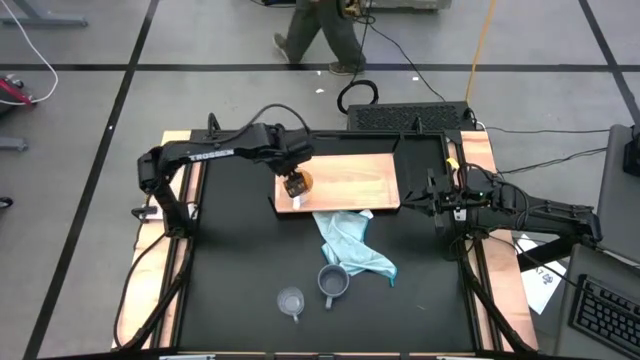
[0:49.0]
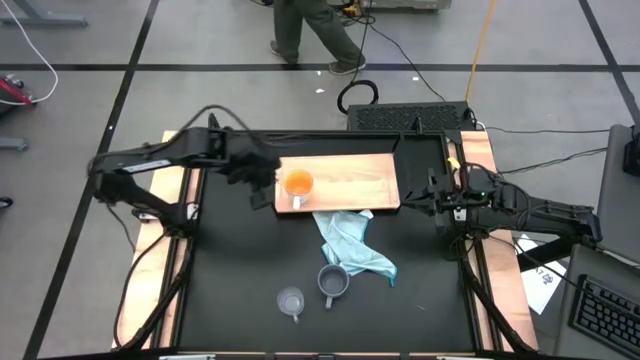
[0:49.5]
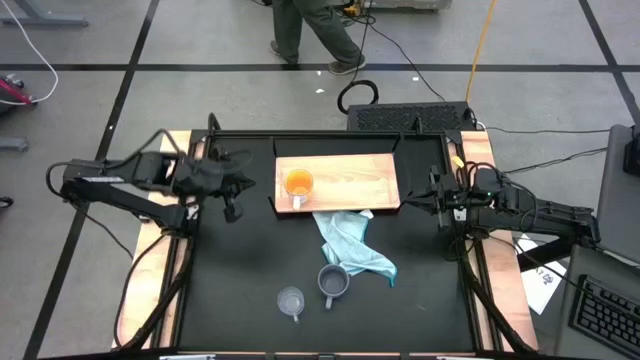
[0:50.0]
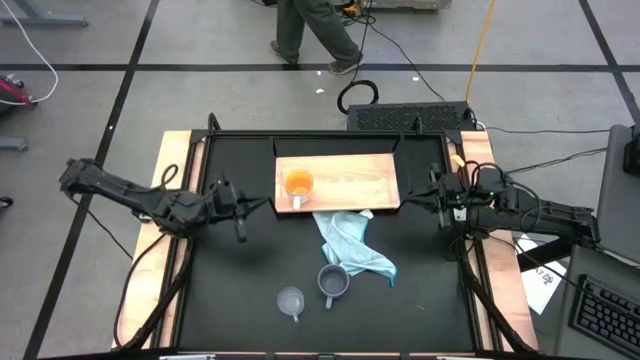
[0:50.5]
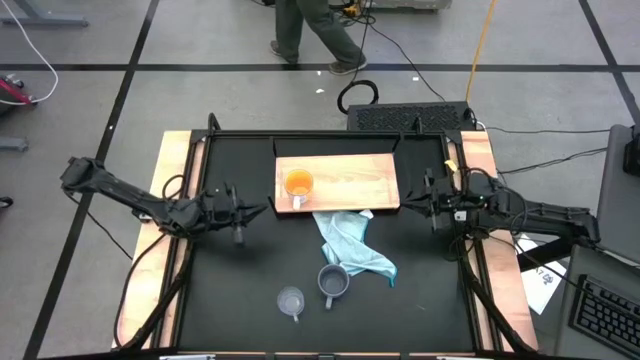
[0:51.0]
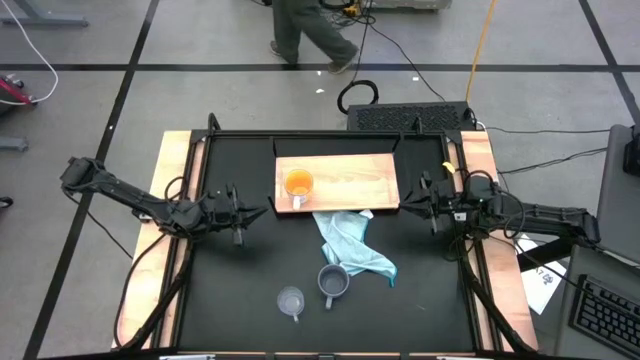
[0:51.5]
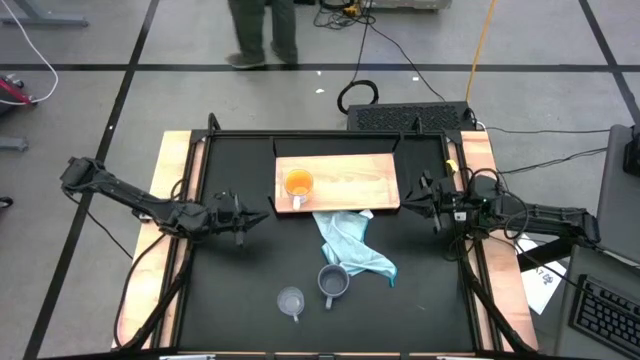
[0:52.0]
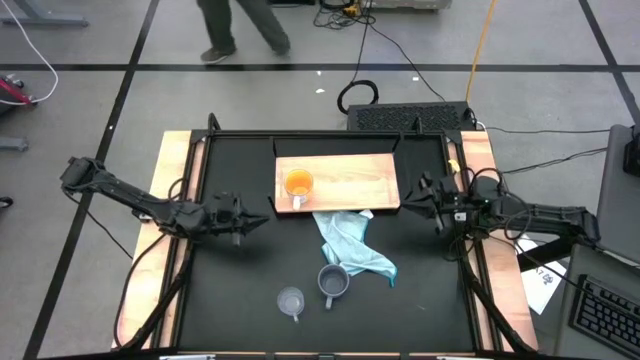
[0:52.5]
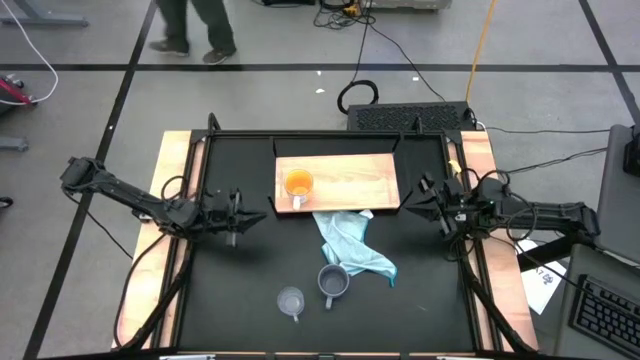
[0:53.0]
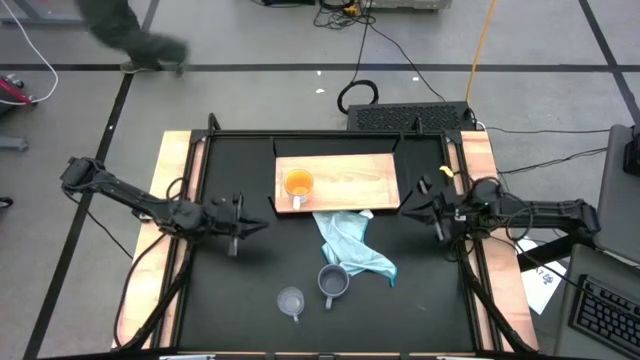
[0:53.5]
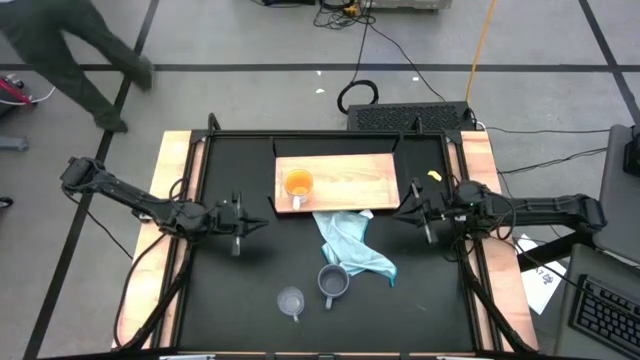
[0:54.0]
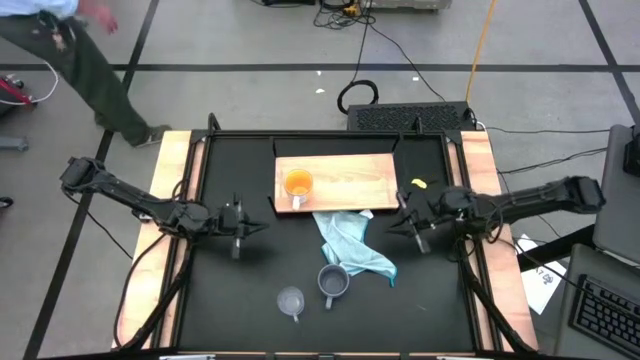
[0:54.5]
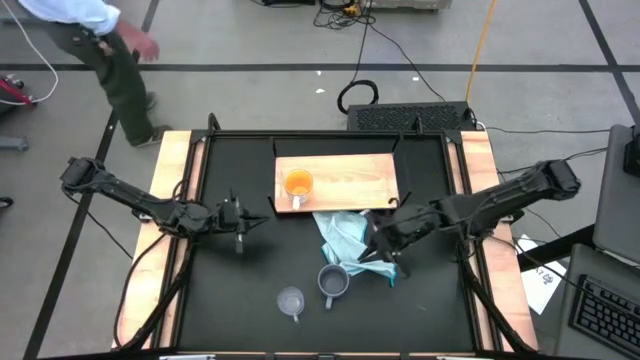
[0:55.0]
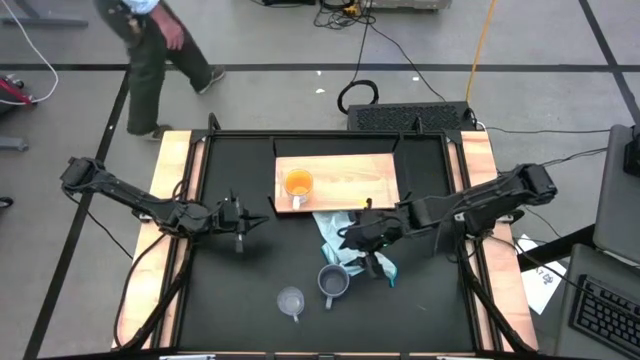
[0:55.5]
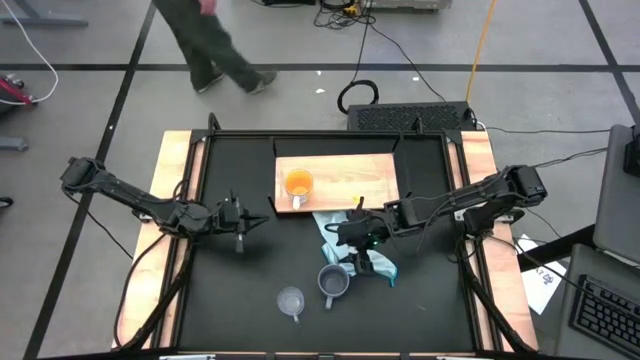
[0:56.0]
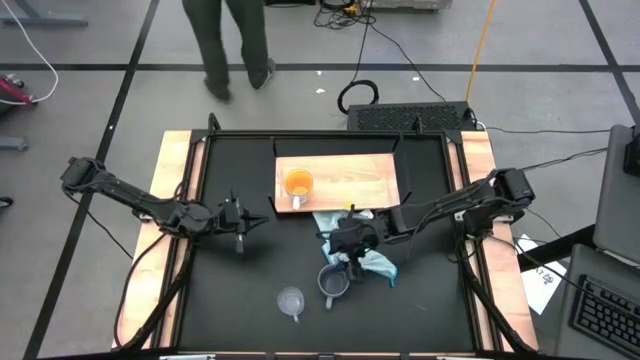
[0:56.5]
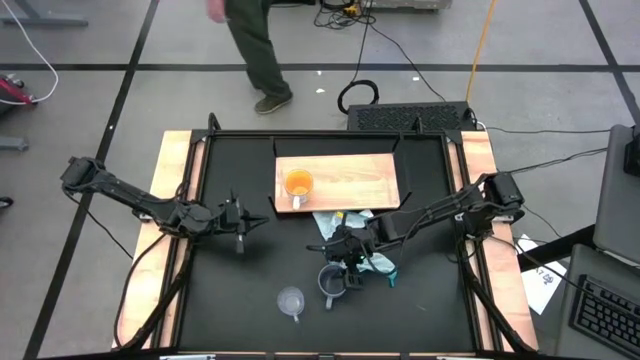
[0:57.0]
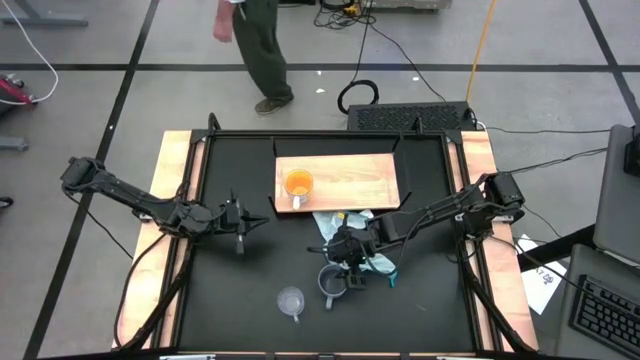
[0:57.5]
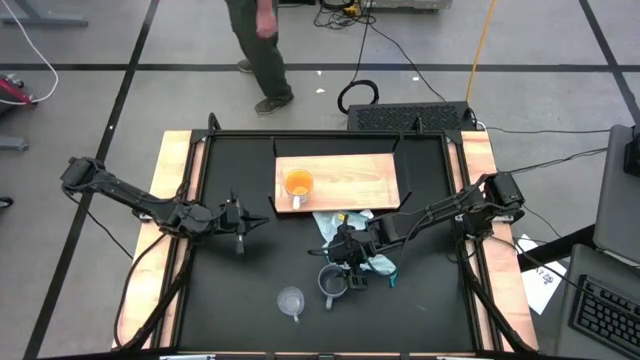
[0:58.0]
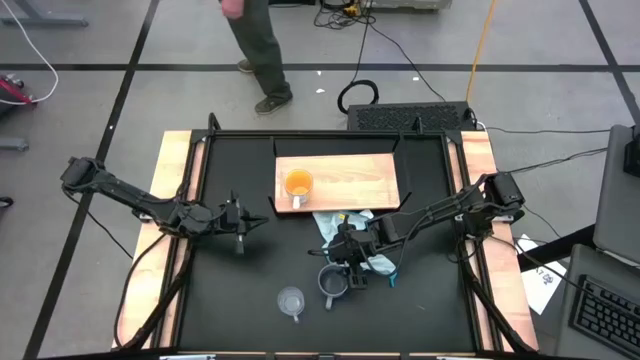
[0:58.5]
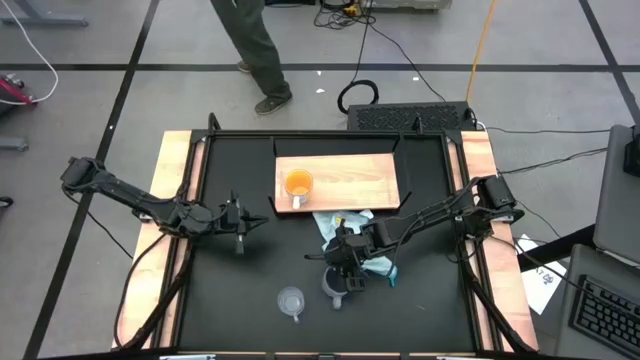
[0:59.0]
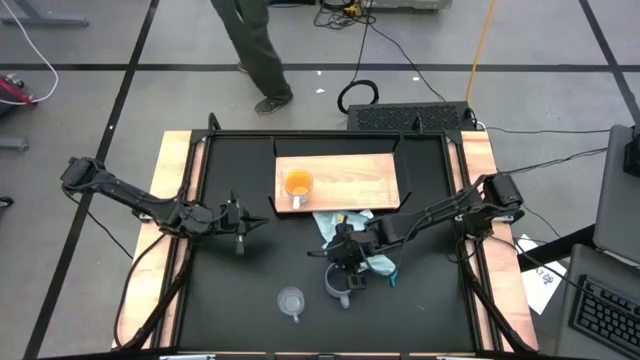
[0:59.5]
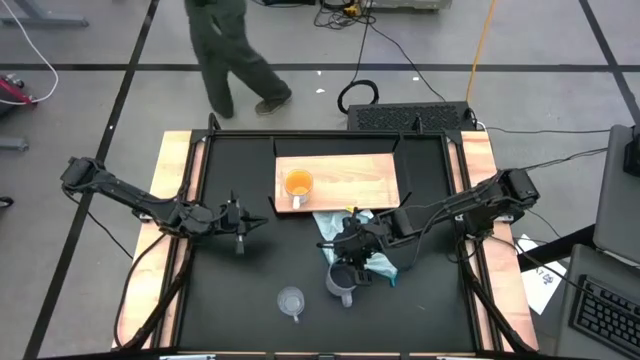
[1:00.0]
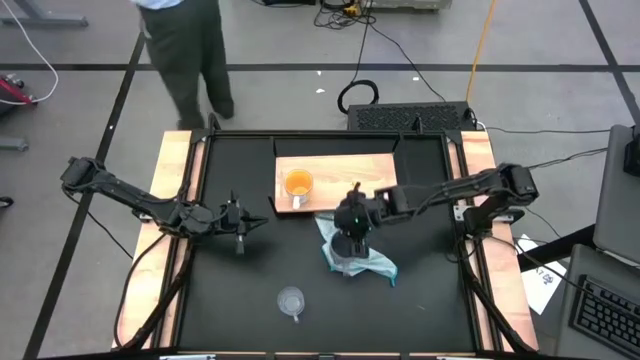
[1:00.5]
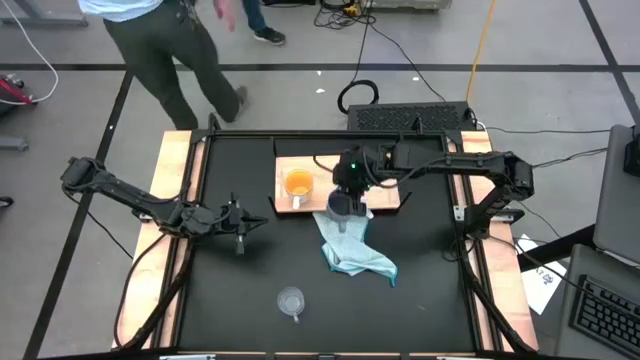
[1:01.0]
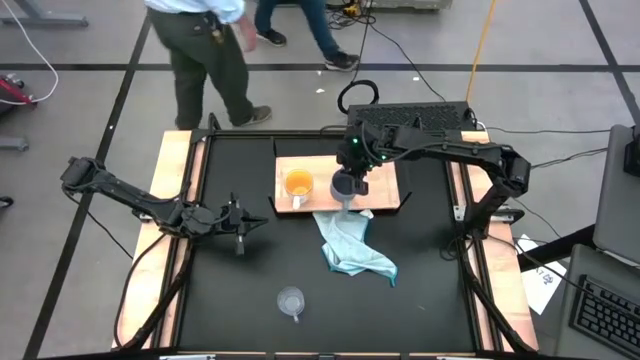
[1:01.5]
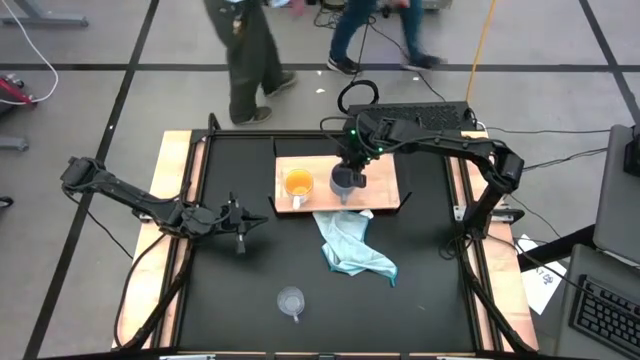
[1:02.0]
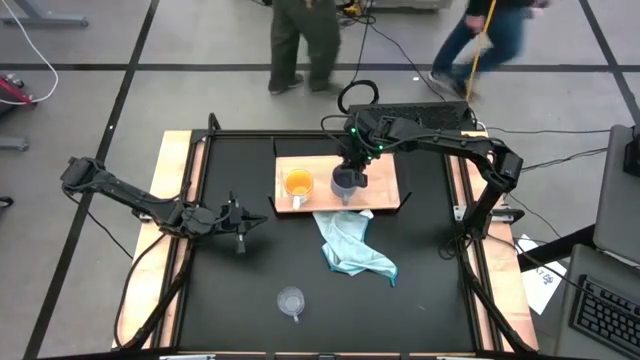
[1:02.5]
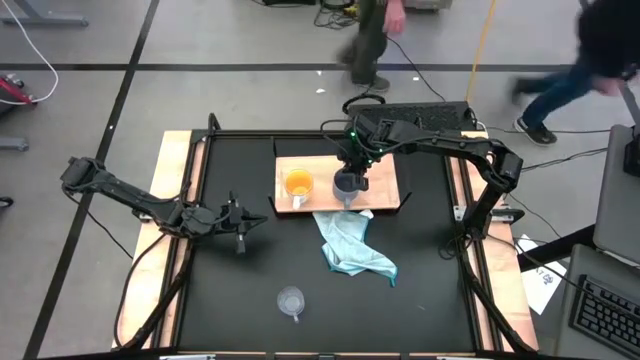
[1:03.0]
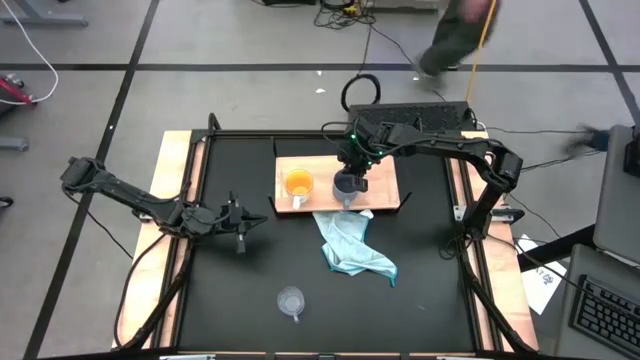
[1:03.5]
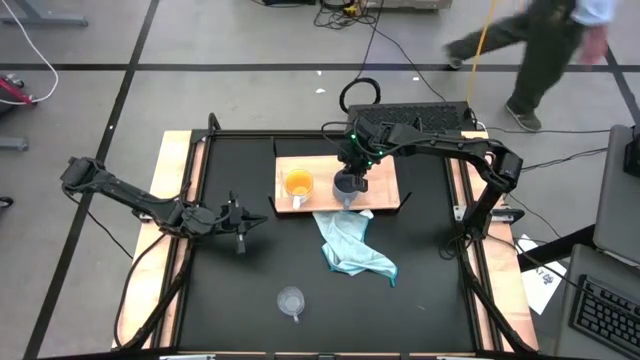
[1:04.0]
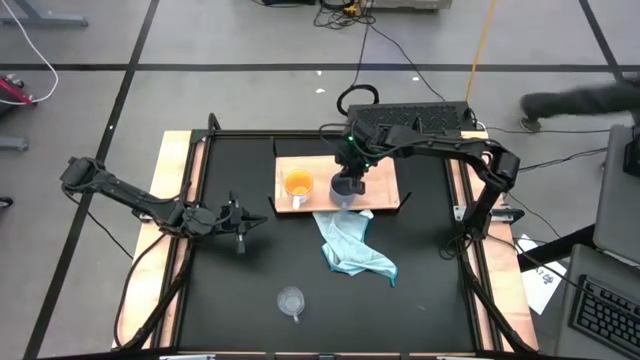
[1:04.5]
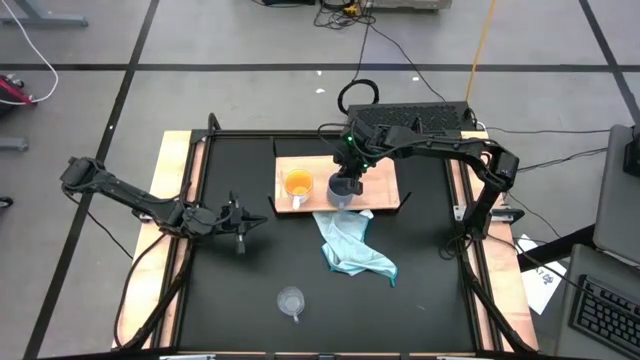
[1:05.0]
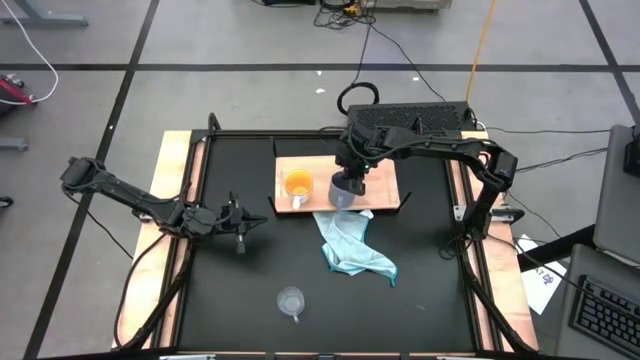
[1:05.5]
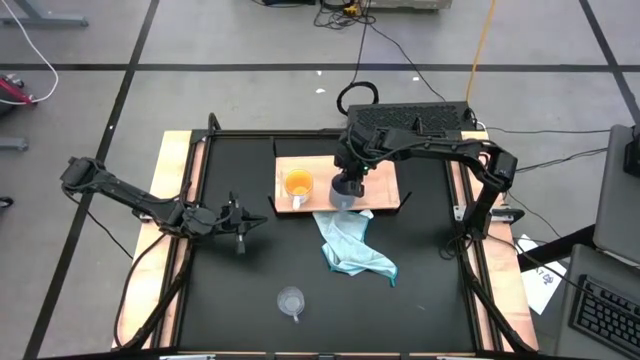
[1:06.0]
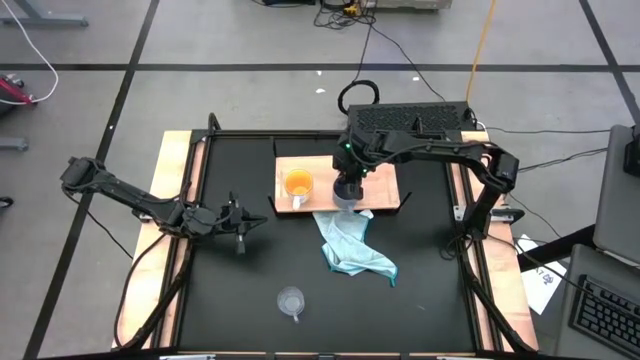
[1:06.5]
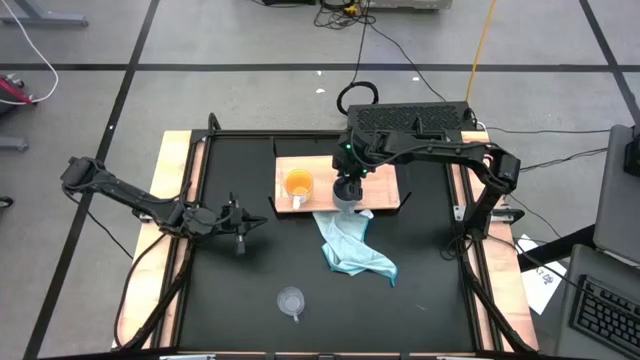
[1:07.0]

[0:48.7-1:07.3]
Task: Stack small to large cups/mugs on shelf
Put the gray mug on the shelf

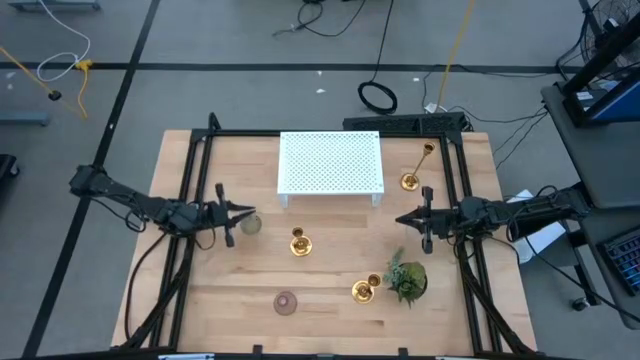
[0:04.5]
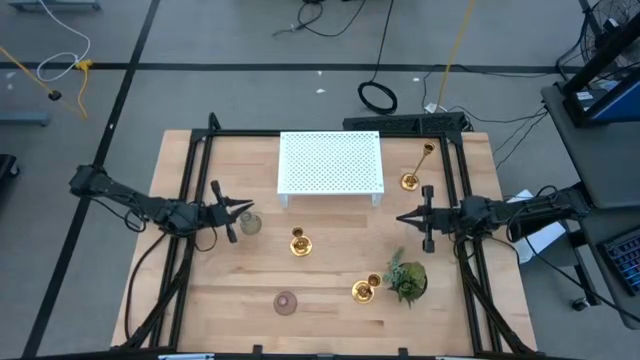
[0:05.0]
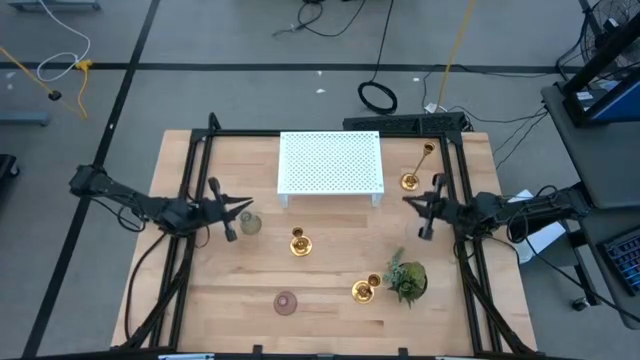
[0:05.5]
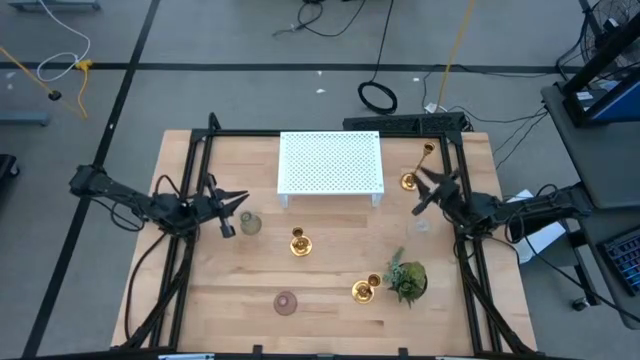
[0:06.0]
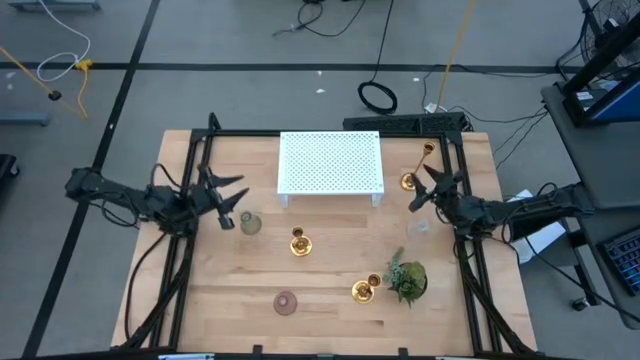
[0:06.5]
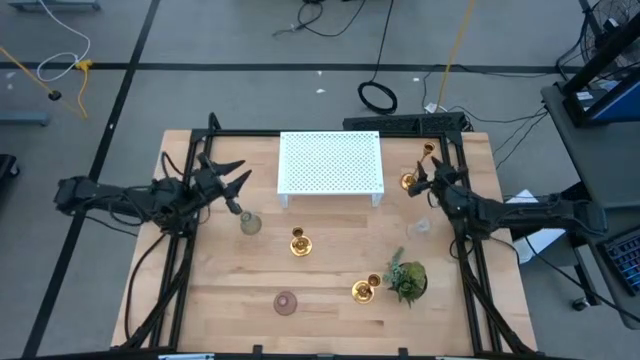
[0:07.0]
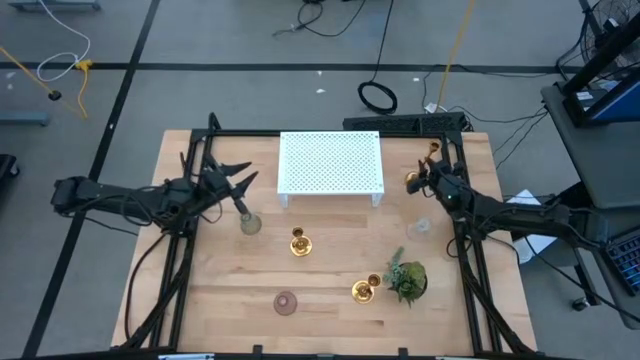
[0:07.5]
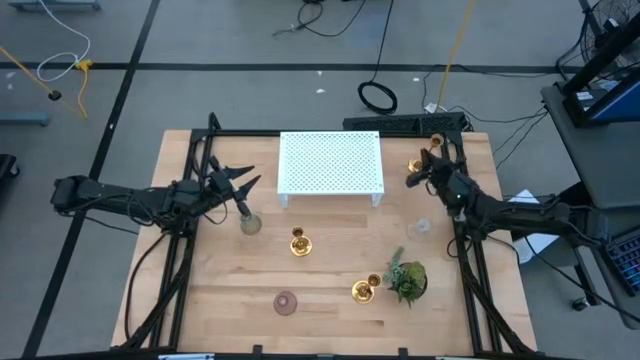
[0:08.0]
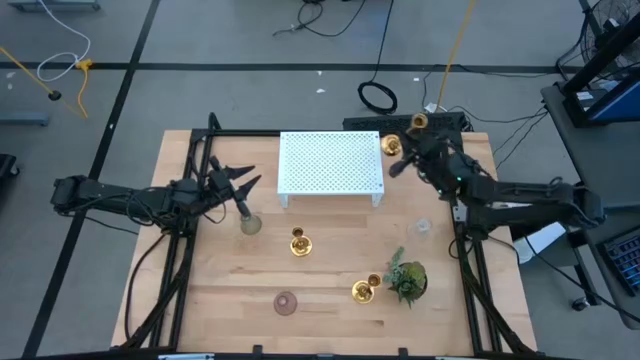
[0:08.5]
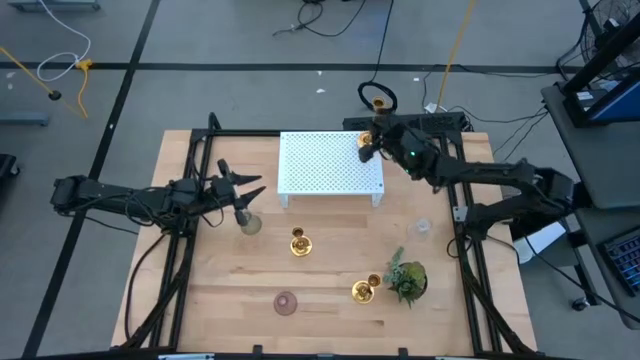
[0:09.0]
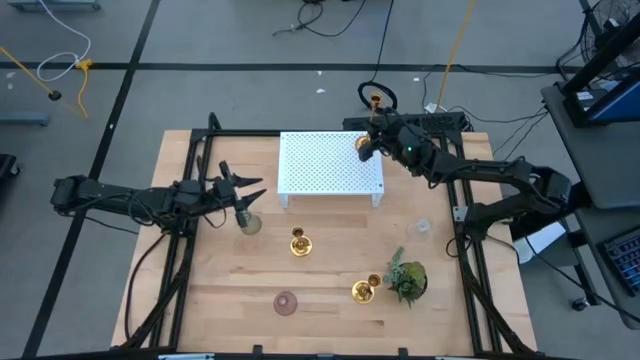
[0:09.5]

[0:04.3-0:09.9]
Task: Pick & Place candle stick holders
Put the top gold candle holder on the shelf
